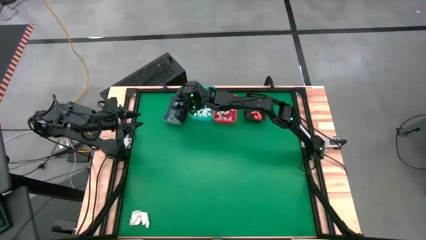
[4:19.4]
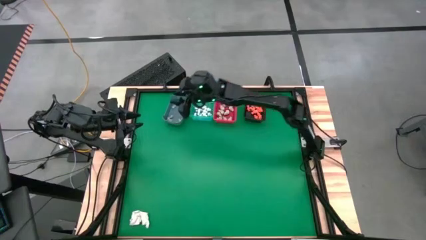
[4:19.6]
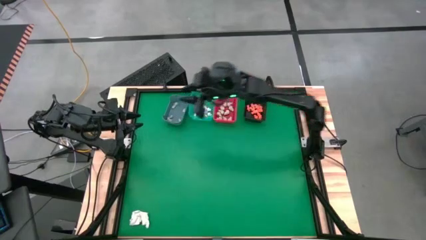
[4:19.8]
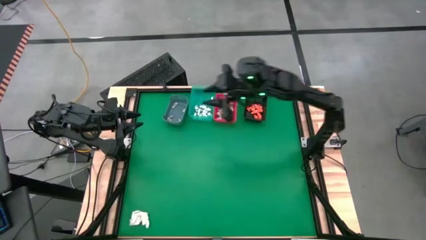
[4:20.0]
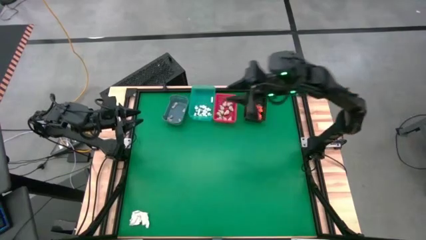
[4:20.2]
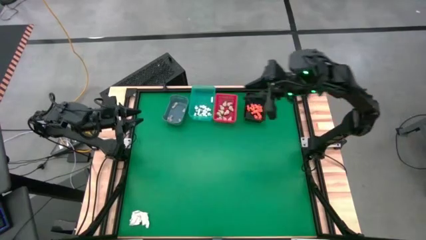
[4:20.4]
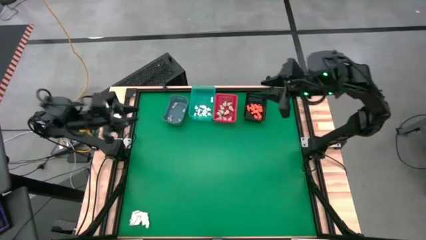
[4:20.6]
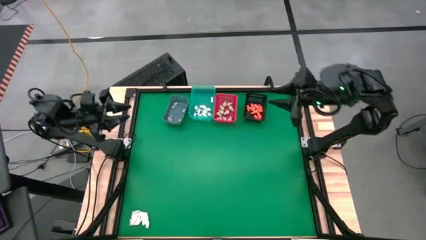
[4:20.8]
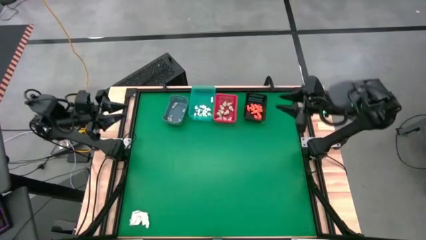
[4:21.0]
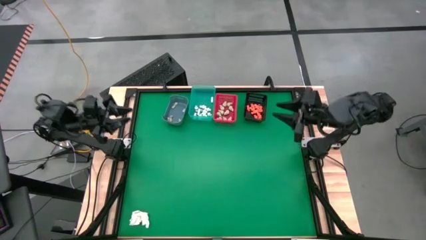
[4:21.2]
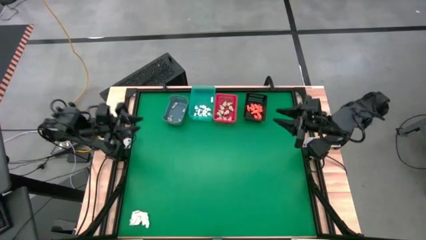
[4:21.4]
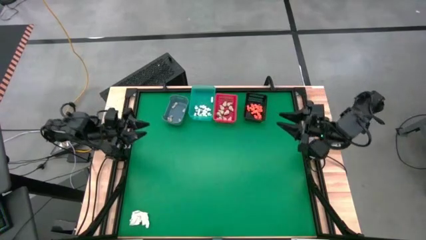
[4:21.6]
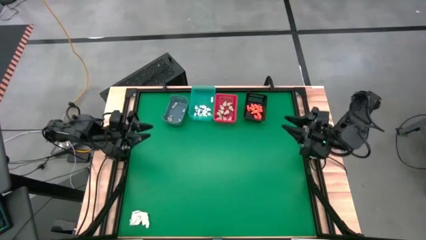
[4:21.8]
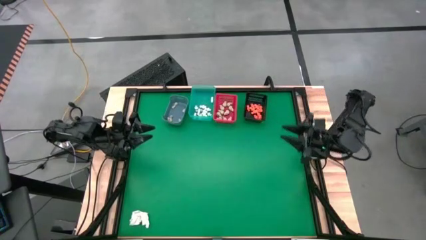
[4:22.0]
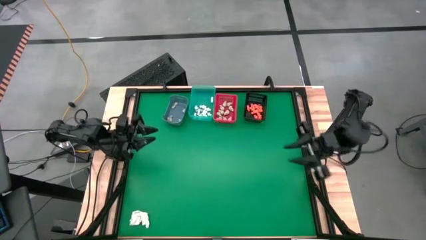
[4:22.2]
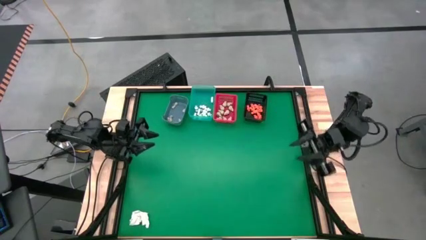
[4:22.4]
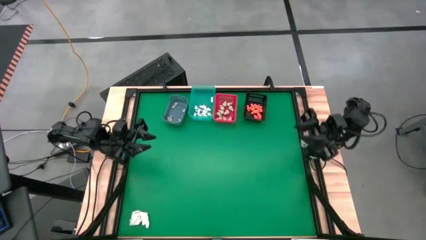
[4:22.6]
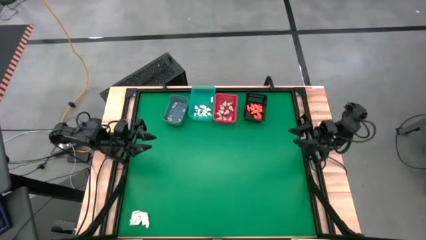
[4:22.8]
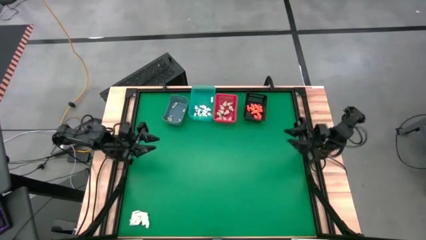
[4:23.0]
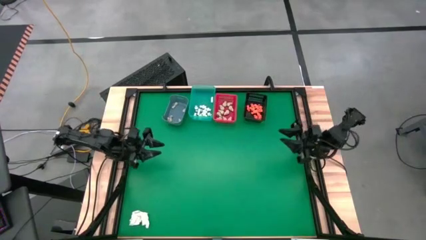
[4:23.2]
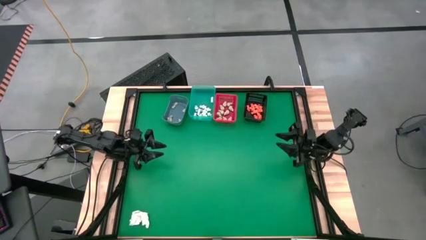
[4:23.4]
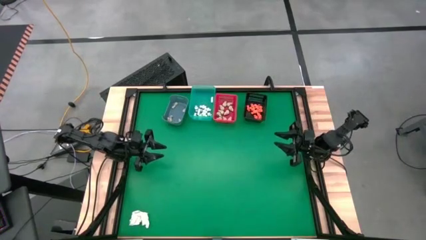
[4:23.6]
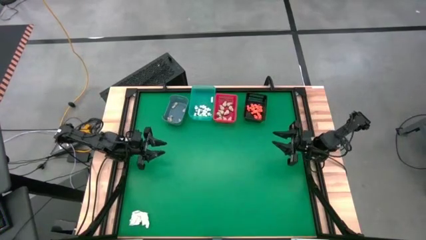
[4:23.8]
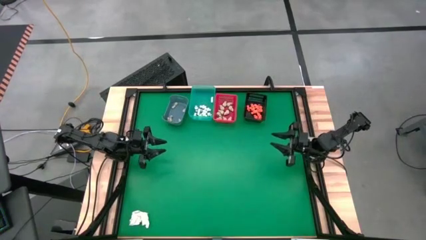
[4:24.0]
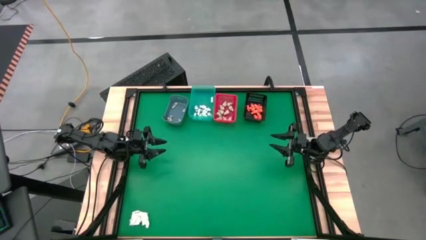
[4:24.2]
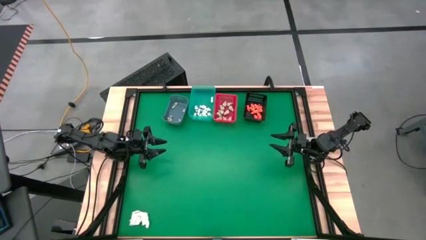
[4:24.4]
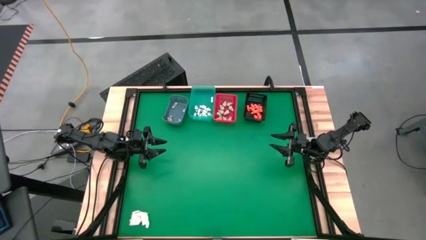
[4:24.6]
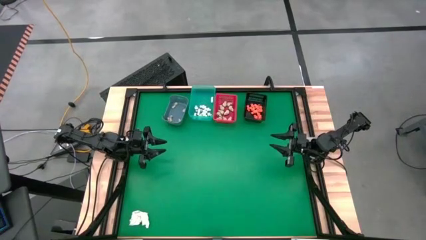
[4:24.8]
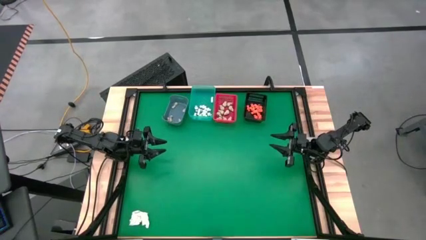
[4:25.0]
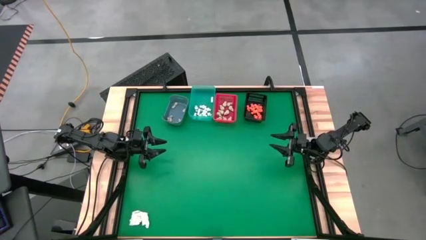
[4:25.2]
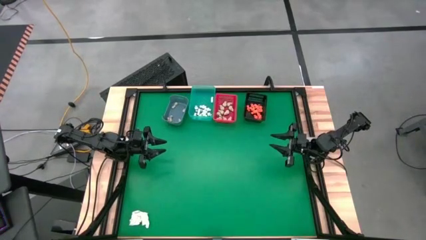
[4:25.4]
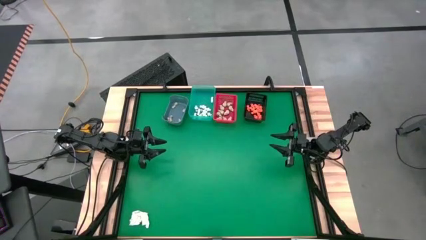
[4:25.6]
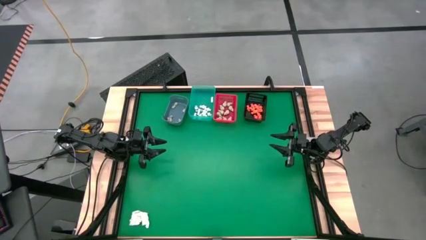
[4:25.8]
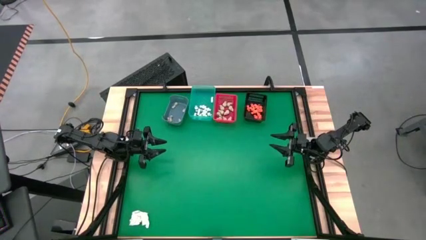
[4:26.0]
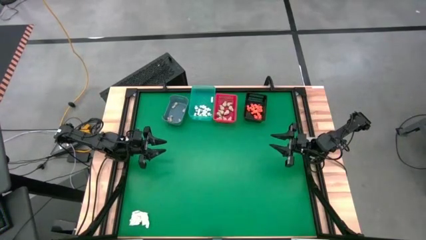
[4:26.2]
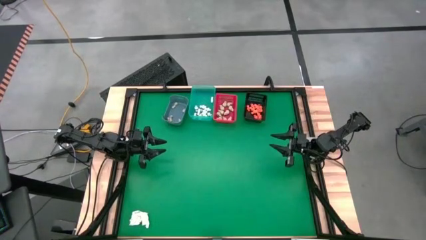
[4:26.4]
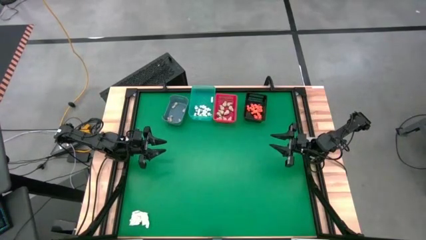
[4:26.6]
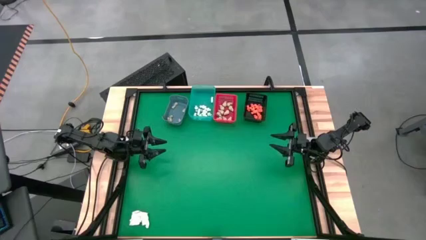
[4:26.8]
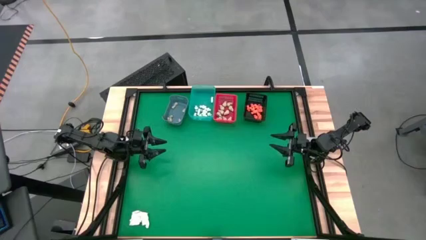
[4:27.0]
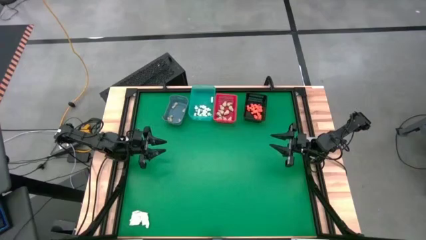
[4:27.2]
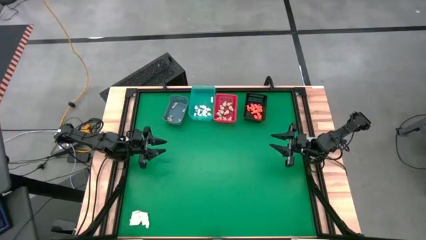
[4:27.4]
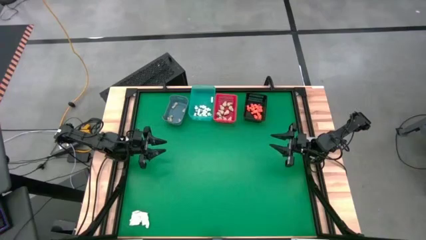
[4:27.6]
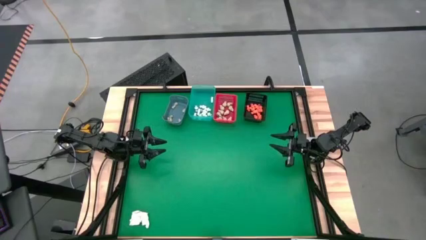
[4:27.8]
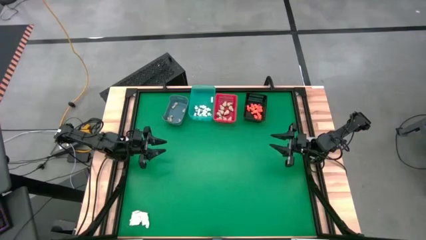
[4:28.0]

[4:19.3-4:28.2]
Task: Sort Halloween decoration
Return to Home Position
